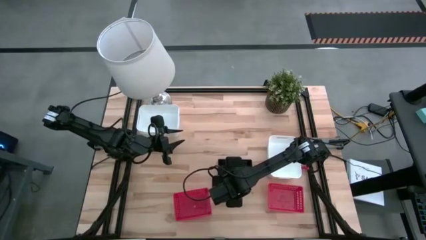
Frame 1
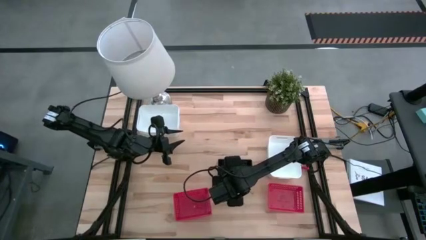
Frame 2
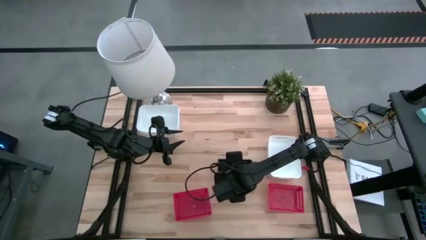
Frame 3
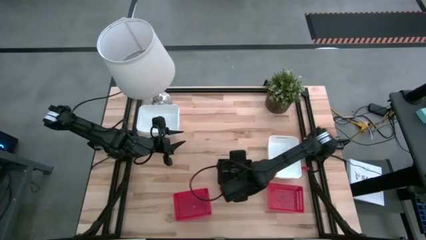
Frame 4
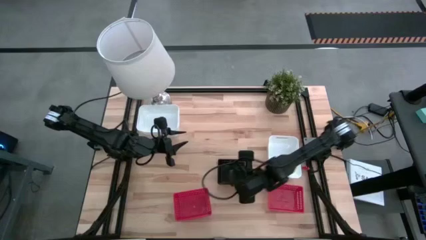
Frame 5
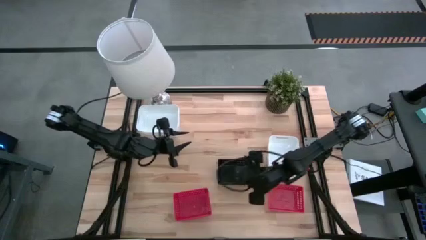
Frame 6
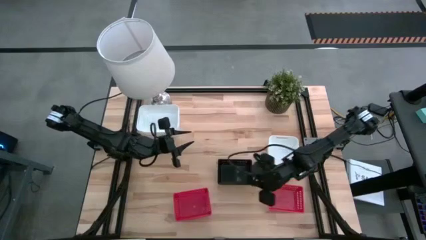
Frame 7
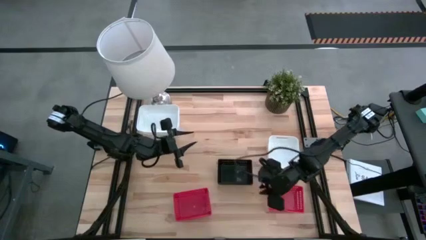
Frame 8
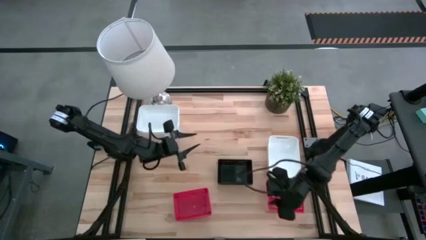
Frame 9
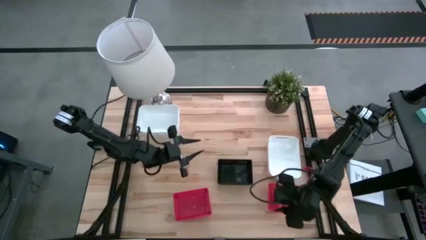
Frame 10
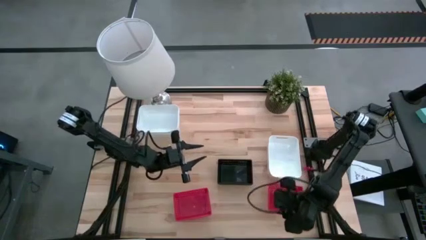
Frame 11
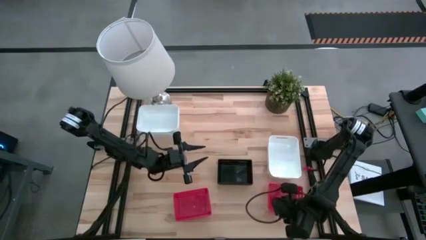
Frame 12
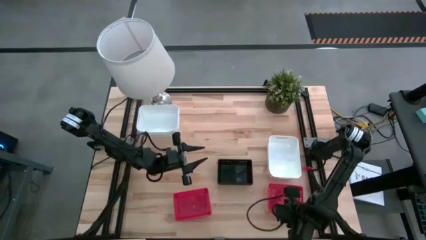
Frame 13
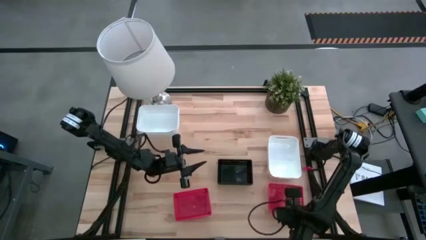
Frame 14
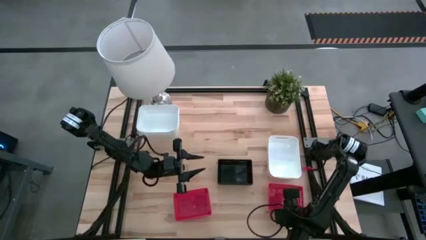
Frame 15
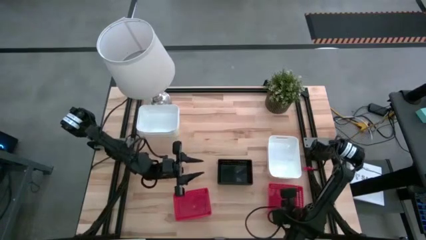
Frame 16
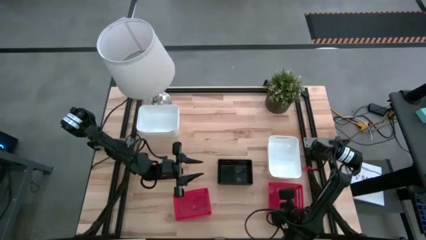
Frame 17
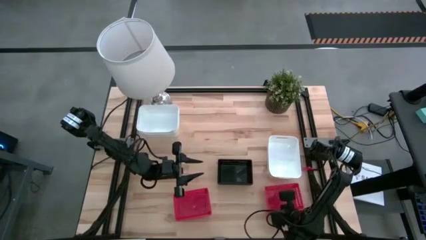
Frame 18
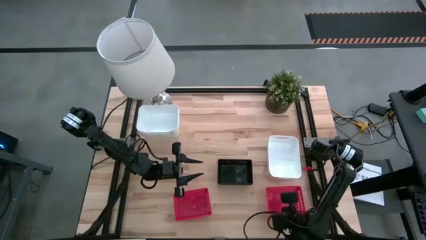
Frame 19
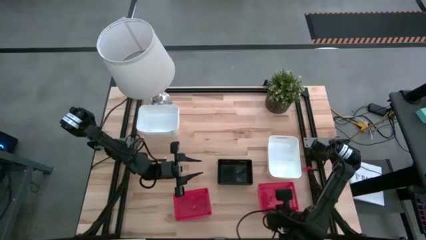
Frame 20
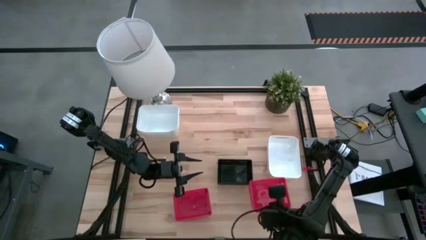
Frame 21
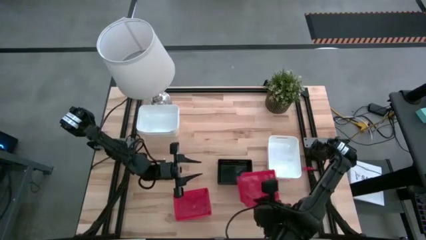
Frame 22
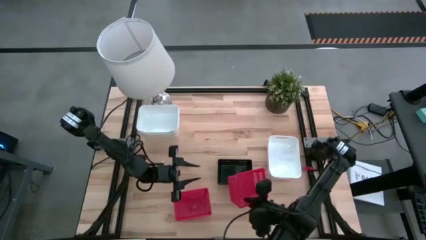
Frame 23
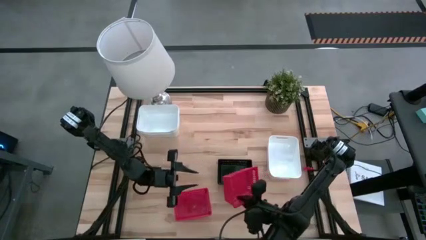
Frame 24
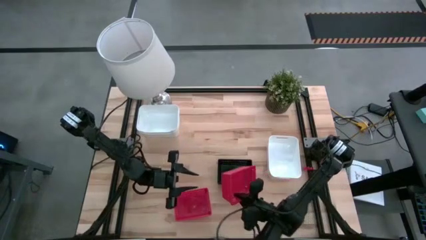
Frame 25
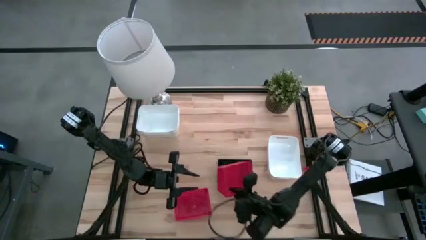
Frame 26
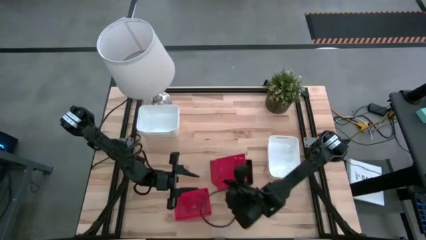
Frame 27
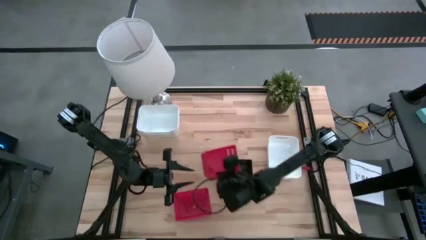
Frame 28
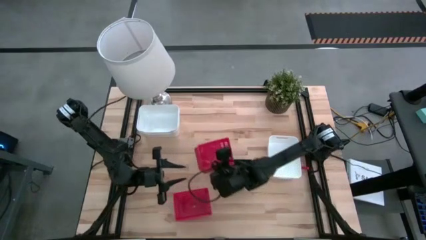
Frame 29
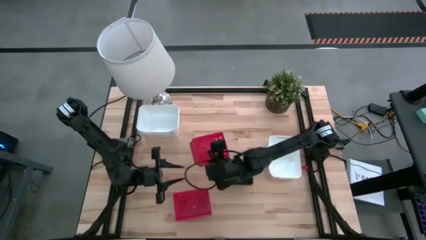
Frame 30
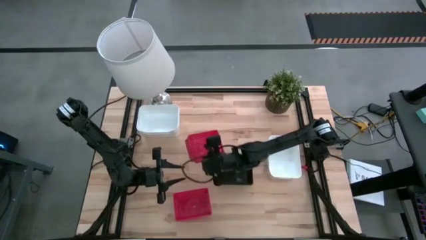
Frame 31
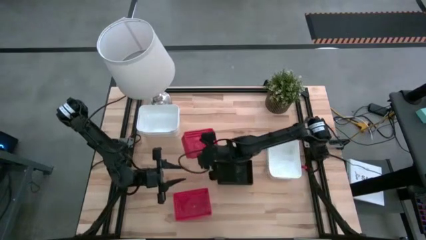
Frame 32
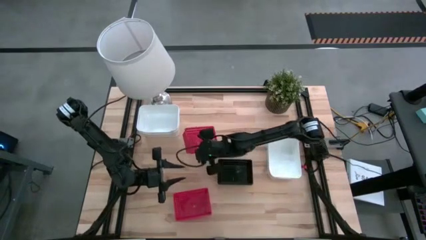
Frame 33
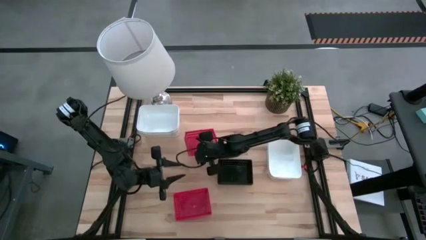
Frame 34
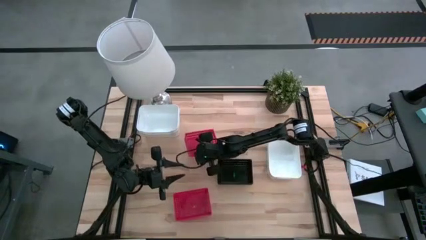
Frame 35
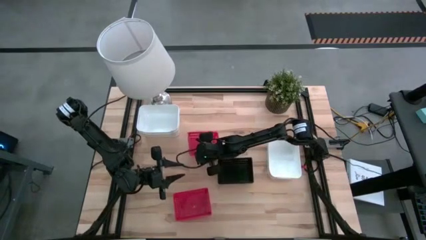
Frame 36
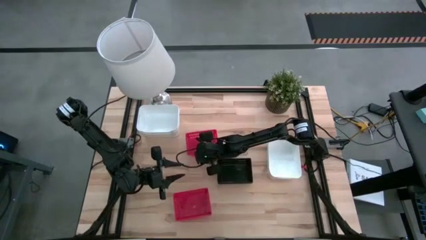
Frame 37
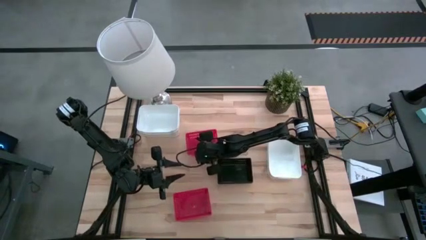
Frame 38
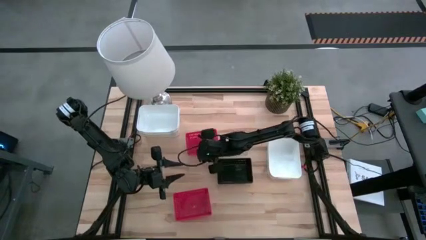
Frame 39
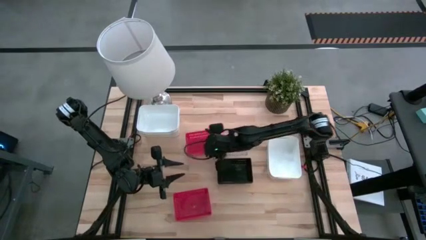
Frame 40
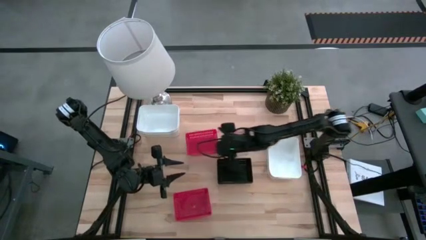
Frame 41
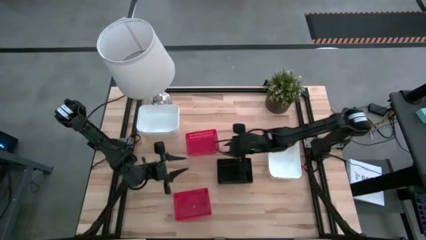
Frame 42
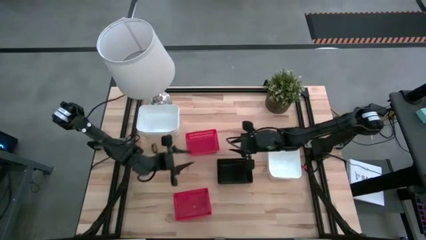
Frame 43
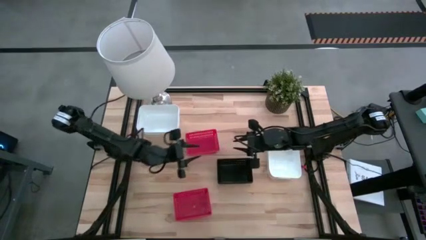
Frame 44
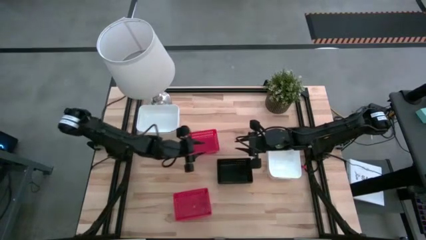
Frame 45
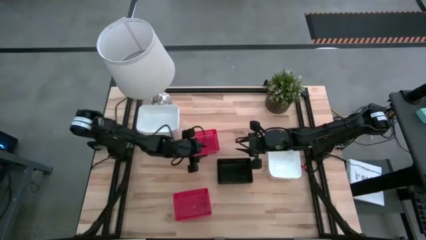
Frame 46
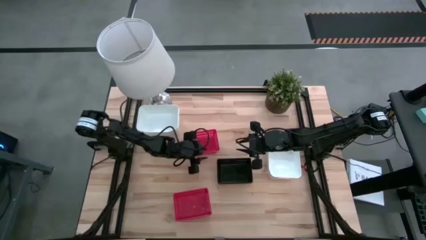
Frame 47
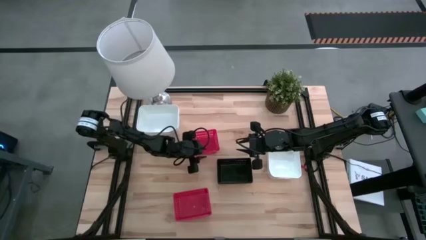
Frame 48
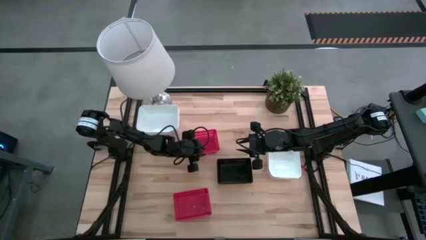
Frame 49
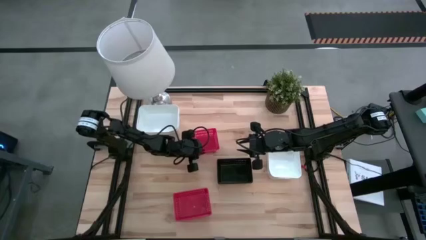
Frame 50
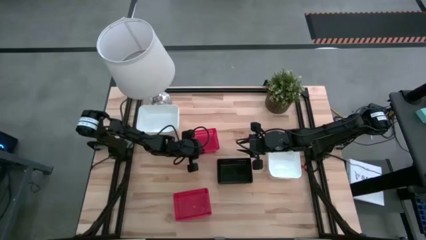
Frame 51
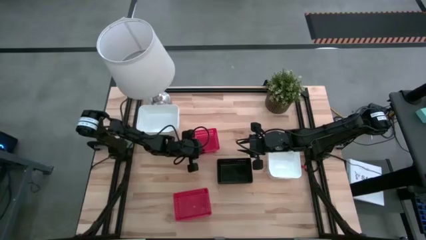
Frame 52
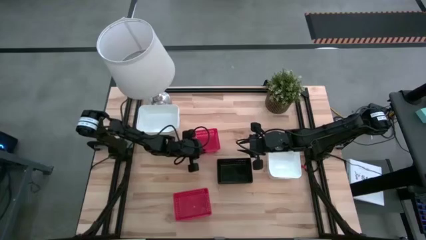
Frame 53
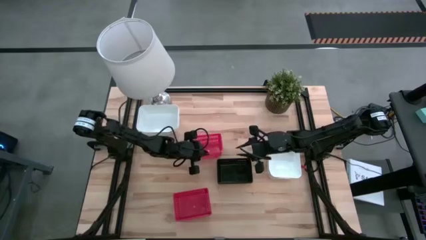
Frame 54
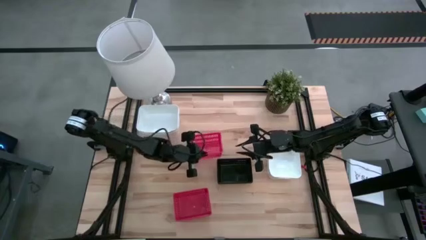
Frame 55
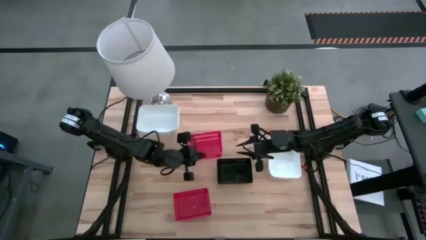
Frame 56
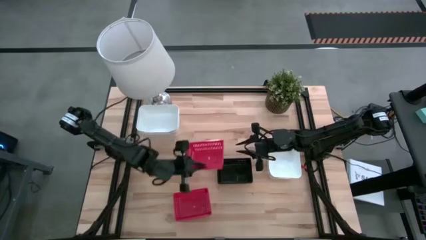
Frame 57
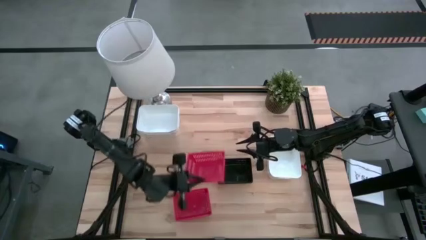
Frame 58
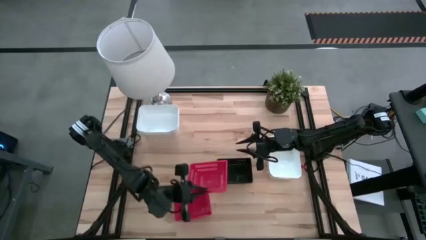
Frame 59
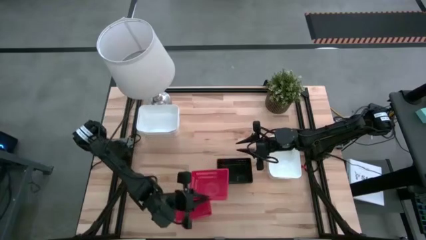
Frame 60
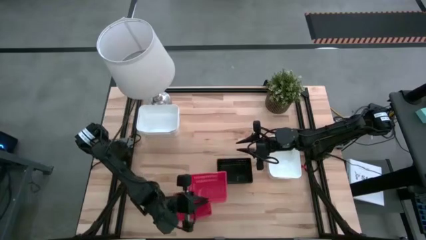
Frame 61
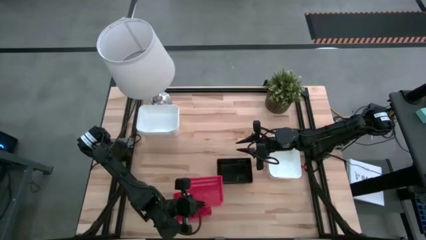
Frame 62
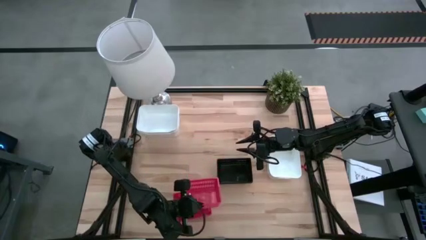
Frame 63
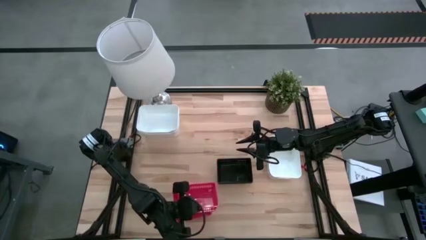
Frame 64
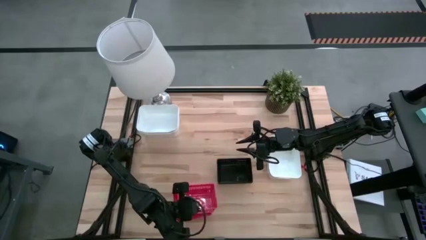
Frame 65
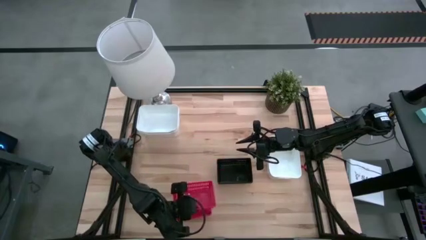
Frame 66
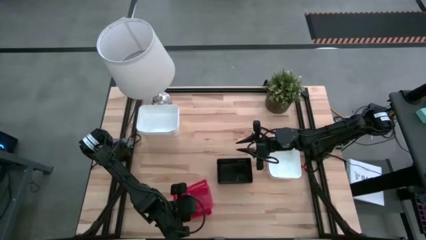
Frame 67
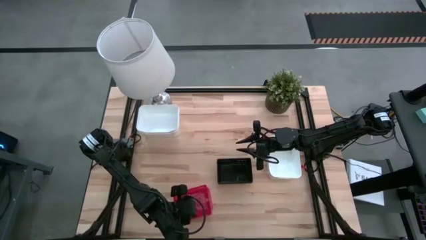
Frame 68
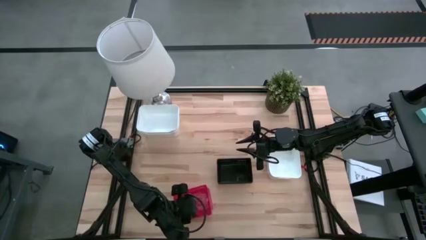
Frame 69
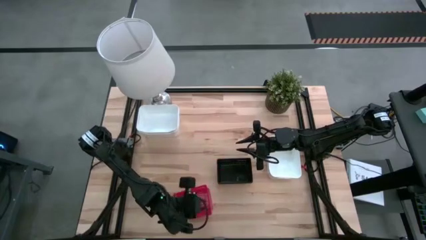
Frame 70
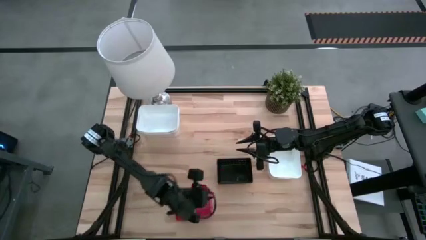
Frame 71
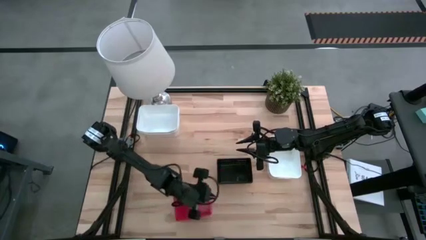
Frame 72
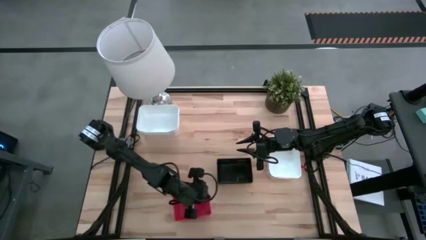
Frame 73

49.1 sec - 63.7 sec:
Stack the right bin on top of the bottom left red bins
